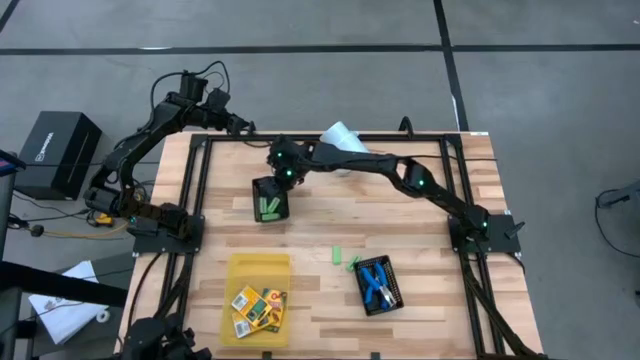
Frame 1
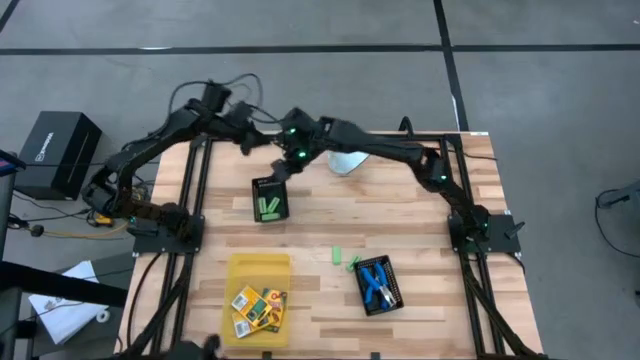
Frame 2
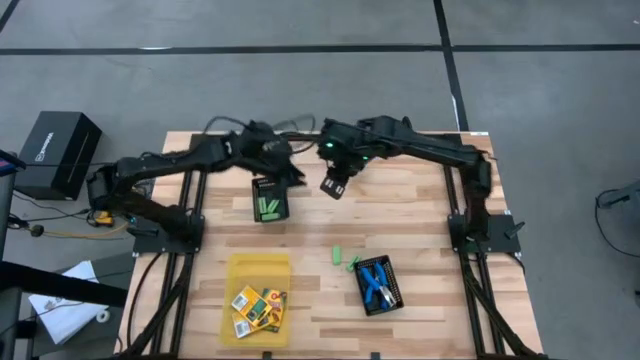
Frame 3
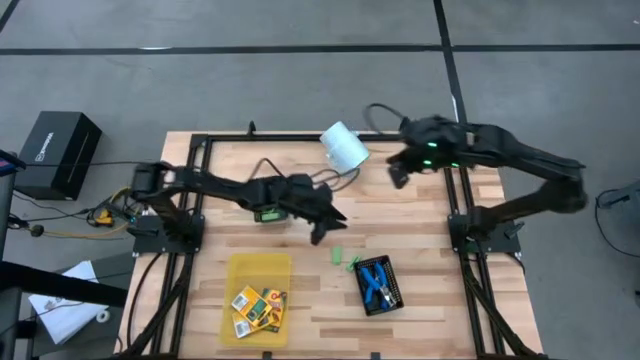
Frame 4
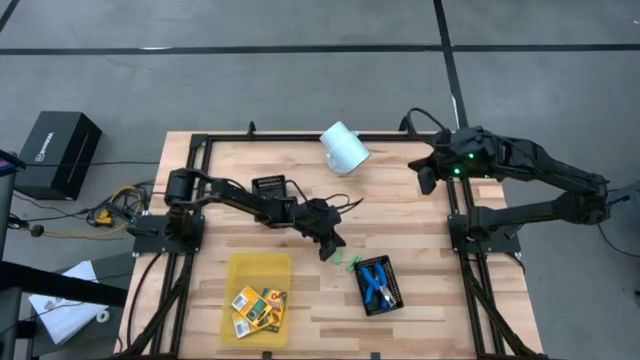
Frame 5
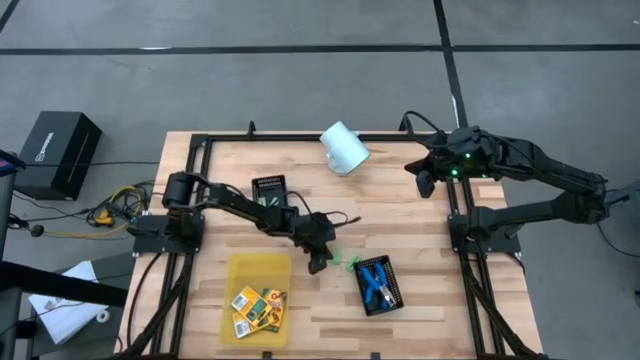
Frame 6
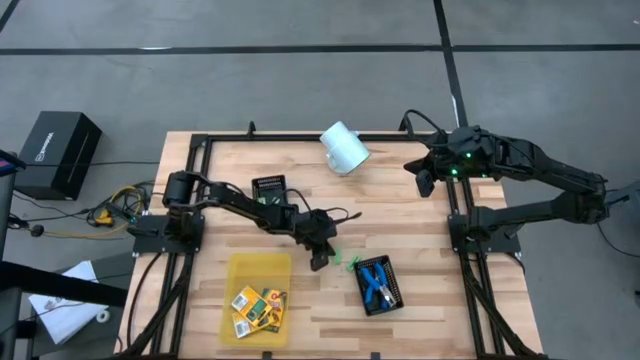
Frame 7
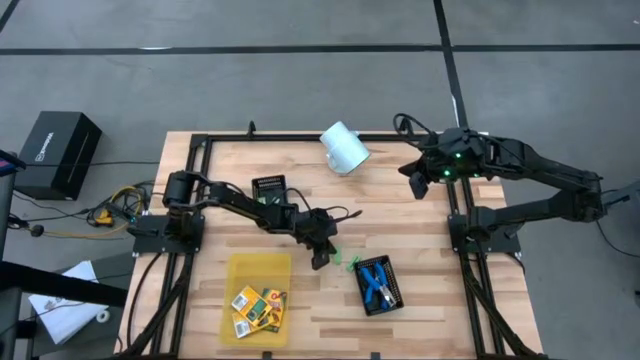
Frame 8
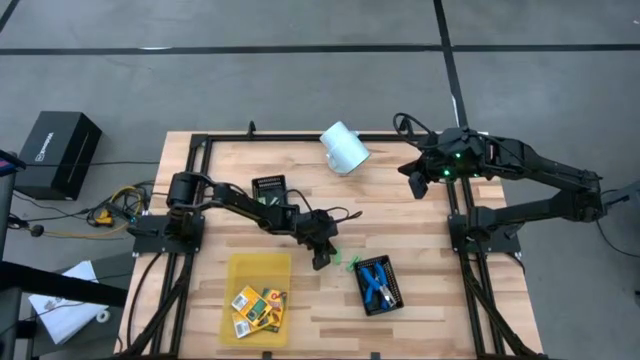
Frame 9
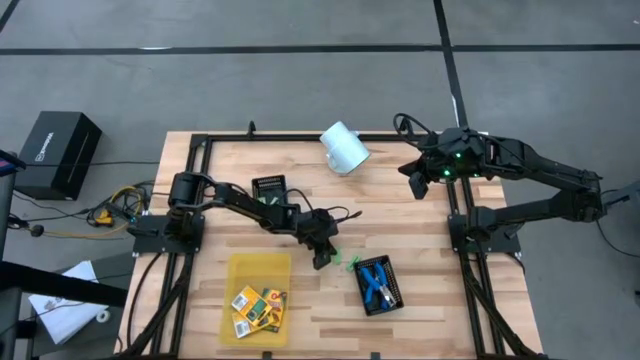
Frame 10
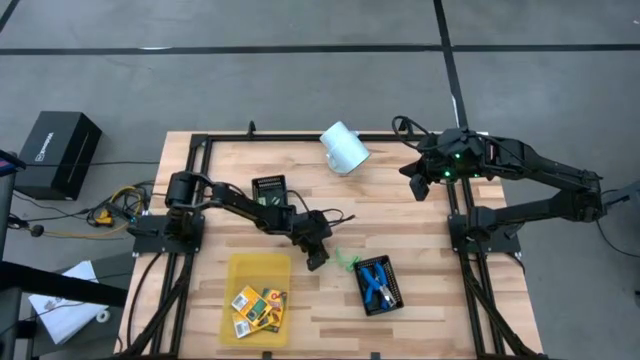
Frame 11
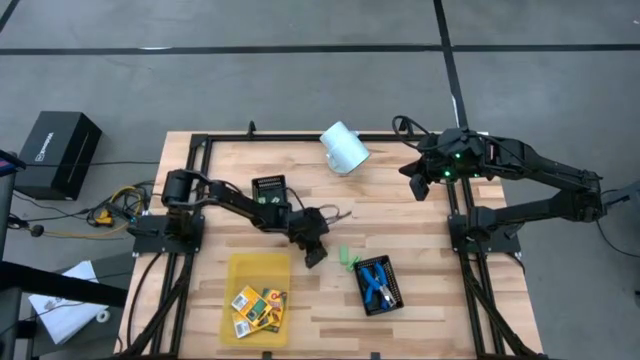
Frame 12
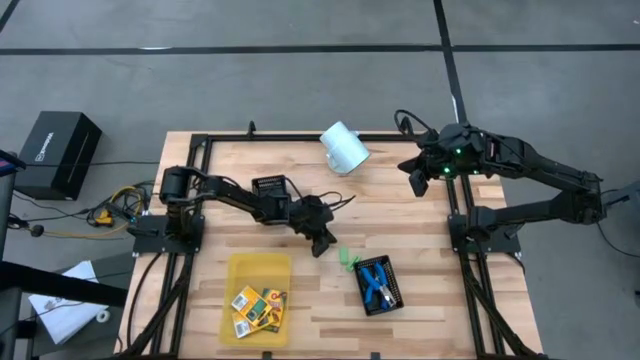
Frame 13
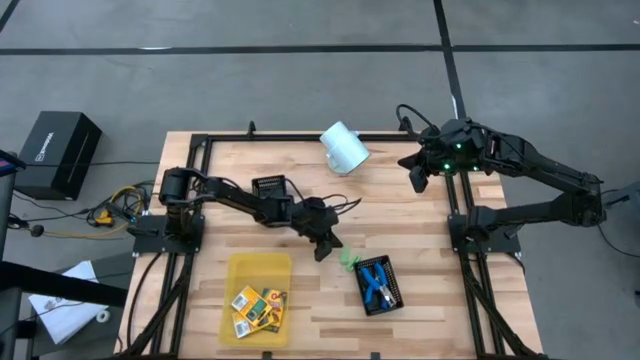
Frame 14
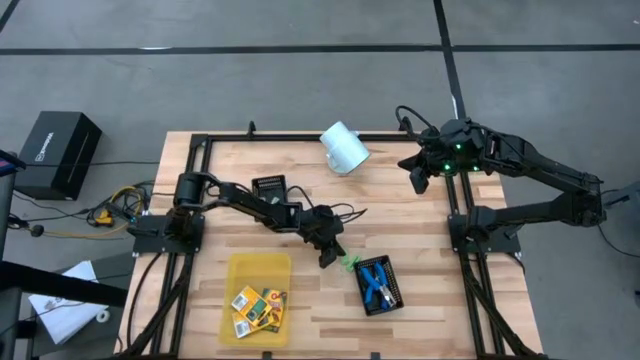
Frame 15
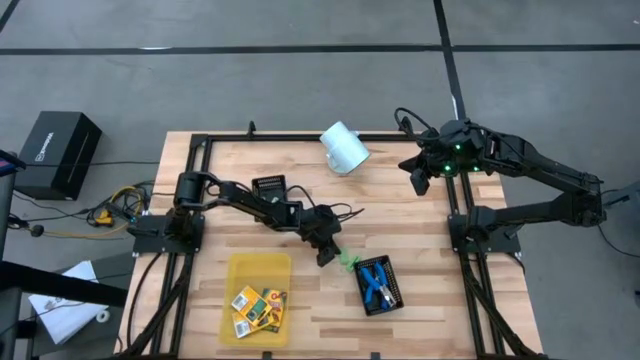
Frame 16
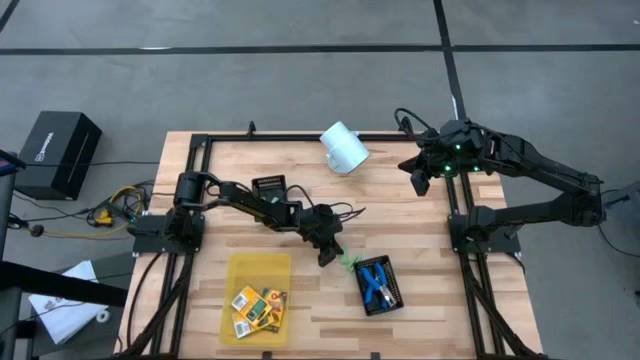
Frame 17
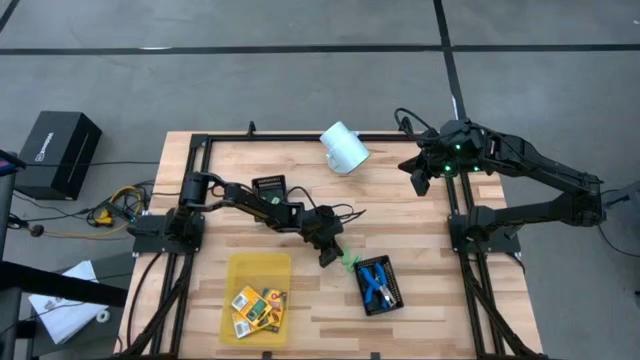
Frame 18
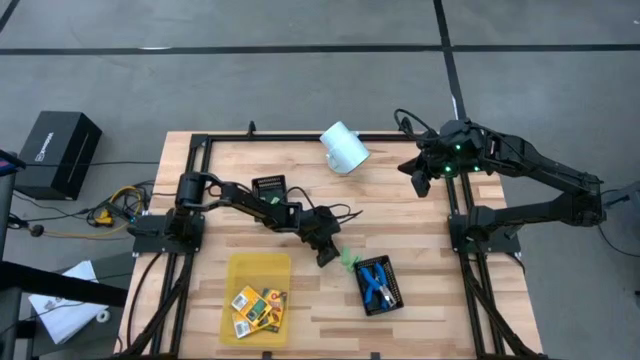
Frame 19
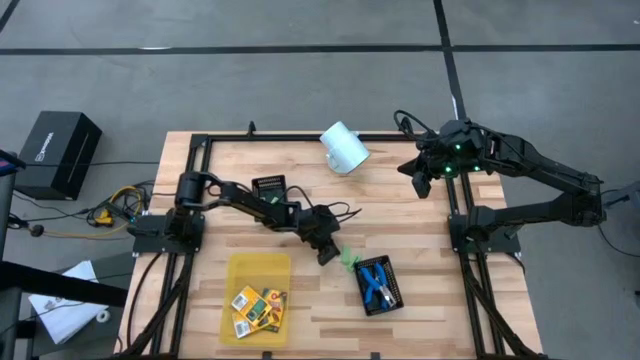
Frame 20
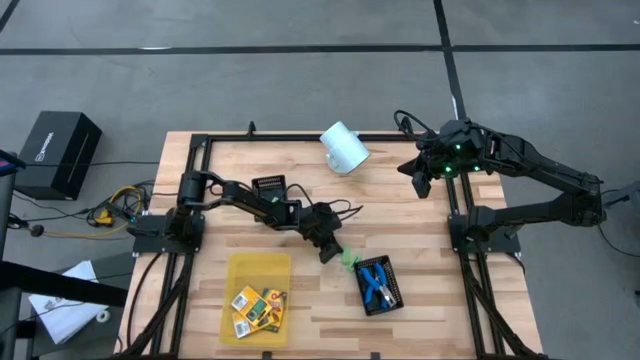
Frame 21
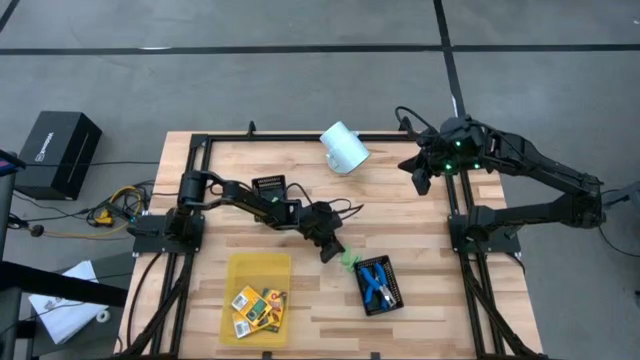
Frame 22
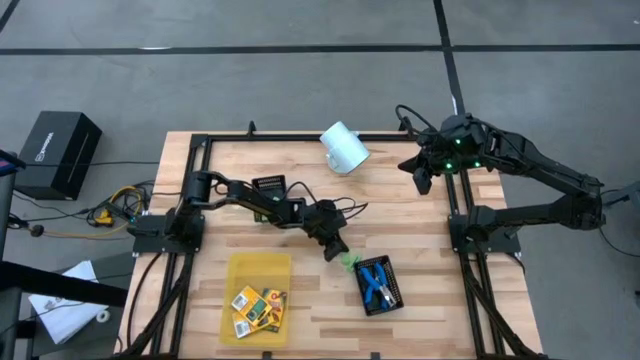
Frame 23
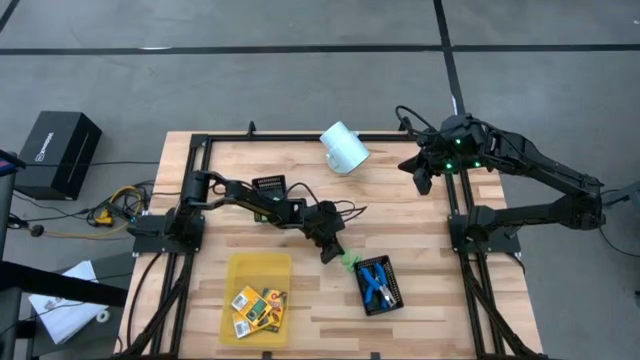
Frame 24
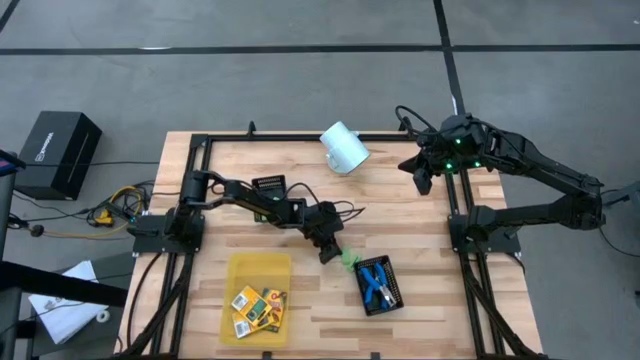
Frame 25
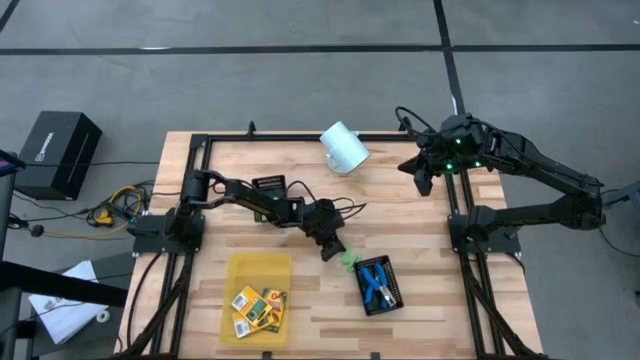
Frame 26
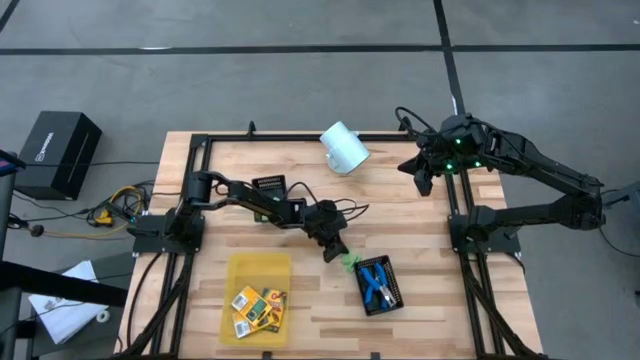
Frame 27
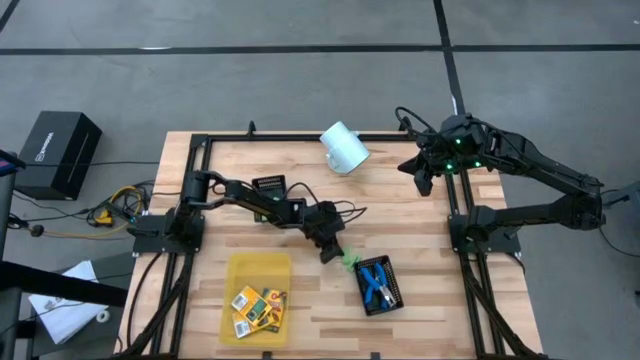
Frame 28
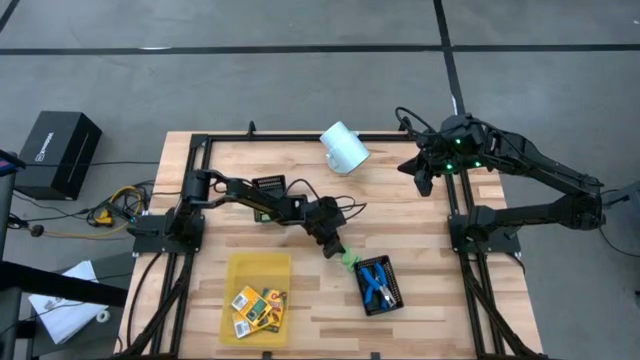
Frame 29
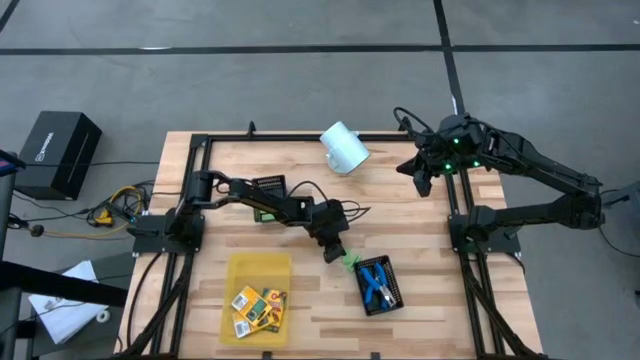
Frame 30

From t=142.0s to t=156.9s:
Task: Pick & Place School Supplies
Put the green eraser into the top black bin

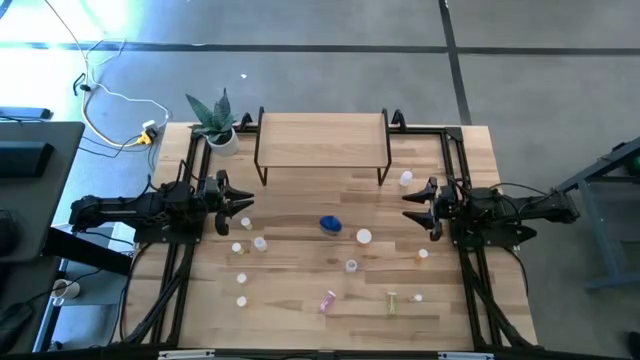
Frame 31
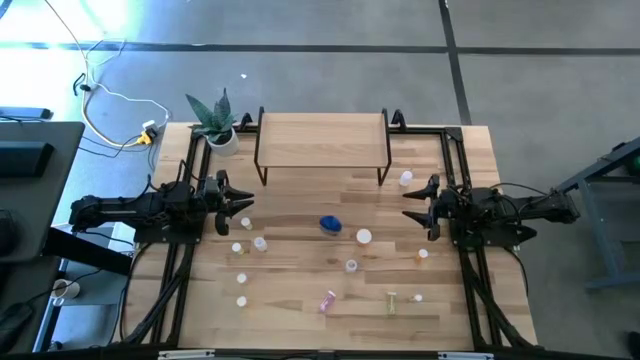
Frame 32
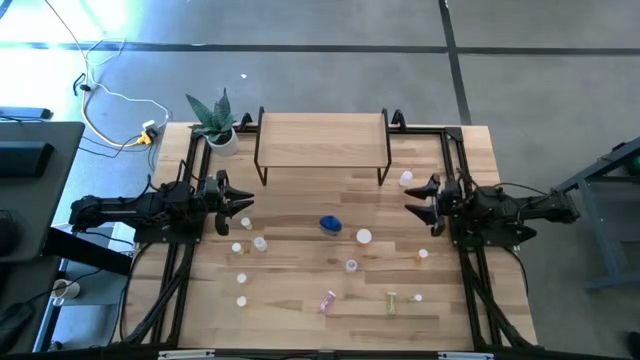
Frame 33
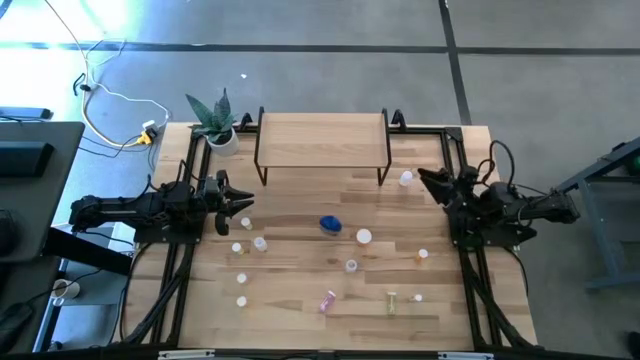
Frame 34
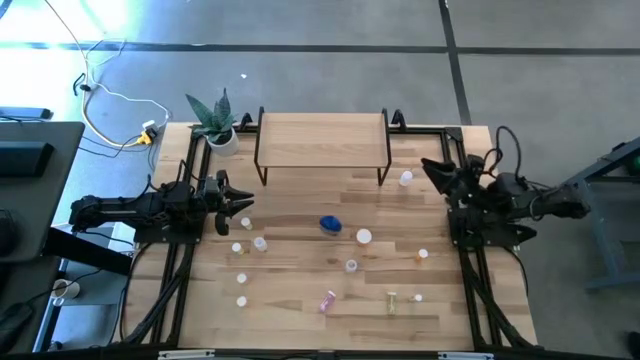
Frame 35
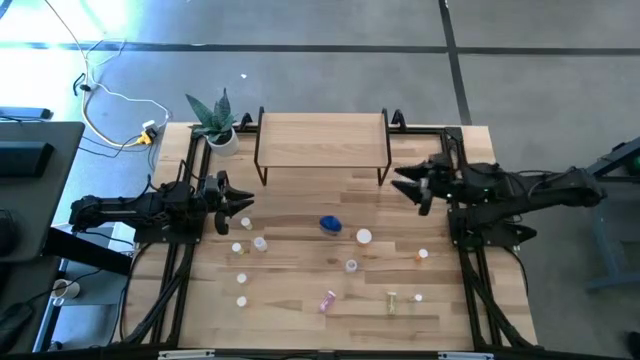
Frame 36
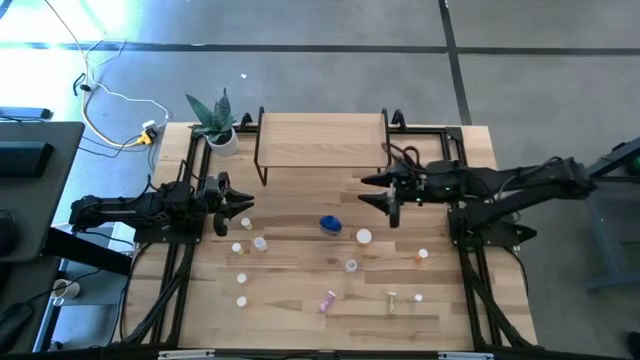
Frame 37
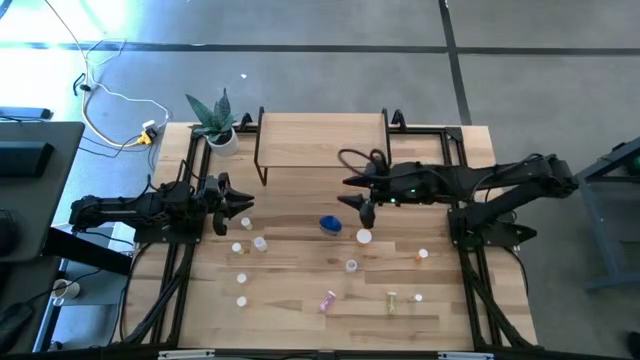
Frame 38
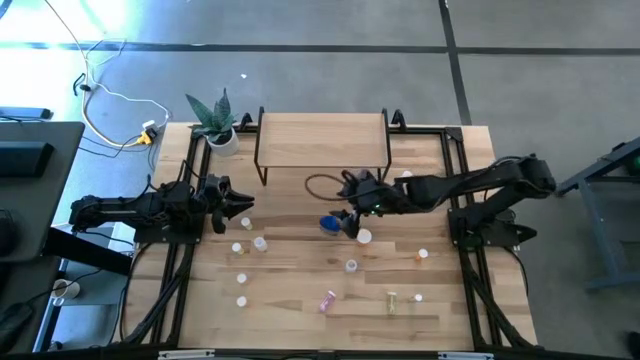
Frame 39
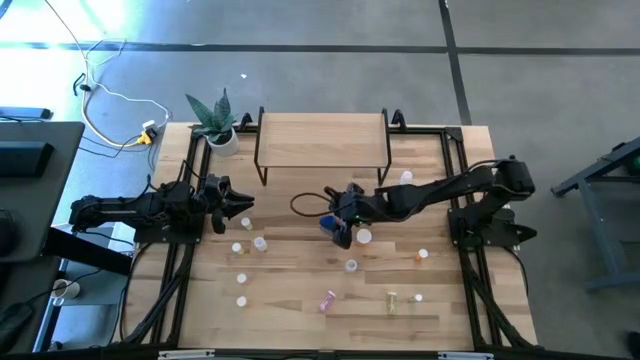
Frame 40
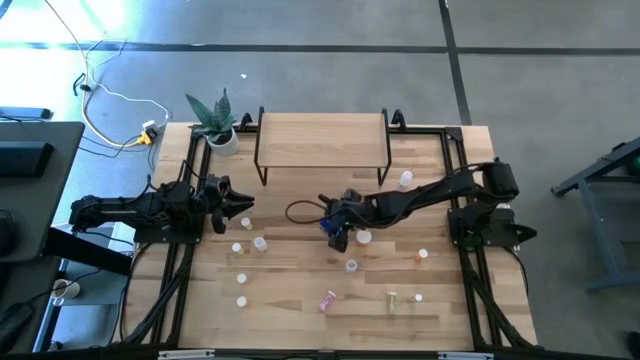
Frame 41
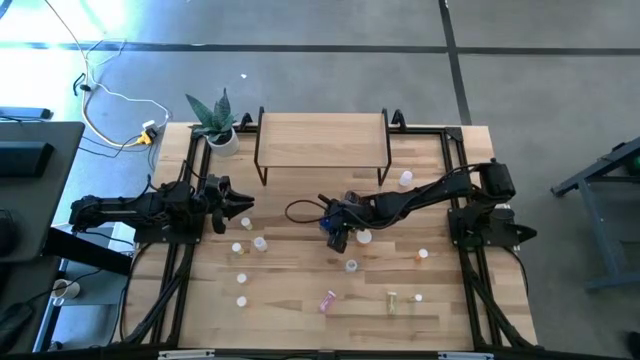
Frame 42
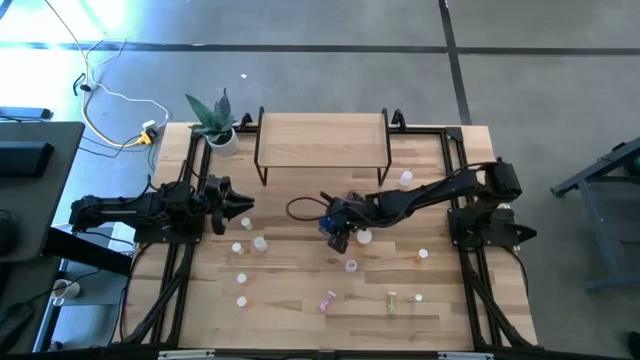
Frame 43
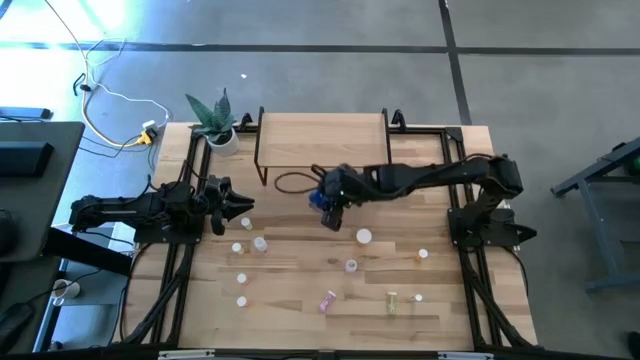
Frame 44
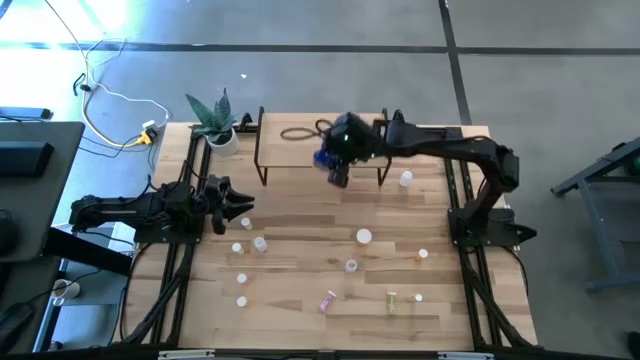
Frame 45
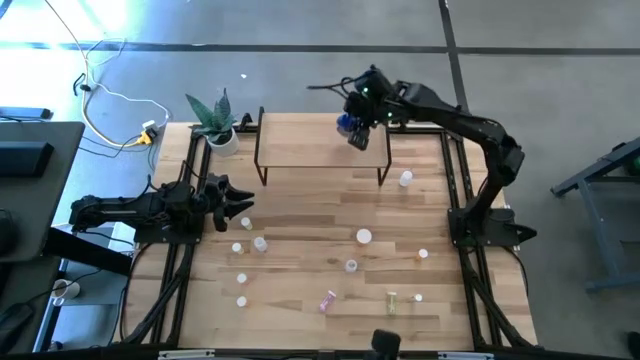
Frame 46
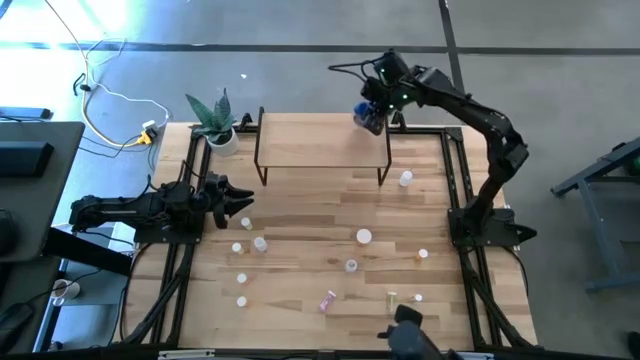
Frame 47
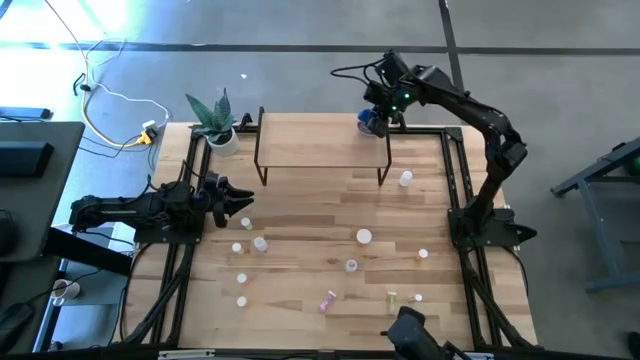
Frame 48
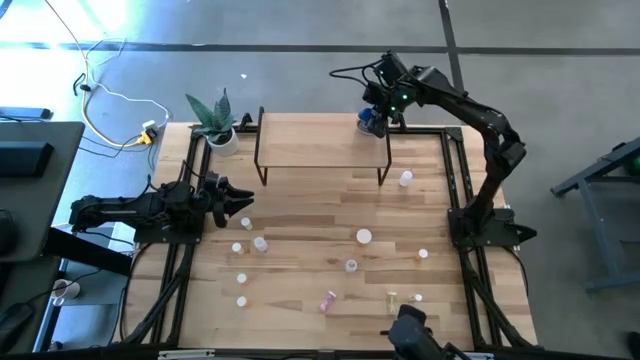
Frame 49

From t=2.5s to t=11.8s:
Task: Pick and place medicine bottles onto shelf by color
Put the large blue gummy pill bottle on the shelf
